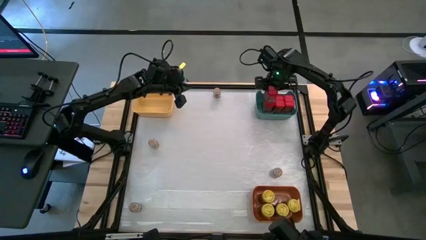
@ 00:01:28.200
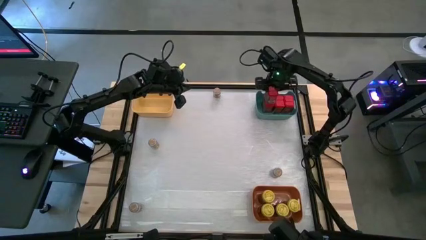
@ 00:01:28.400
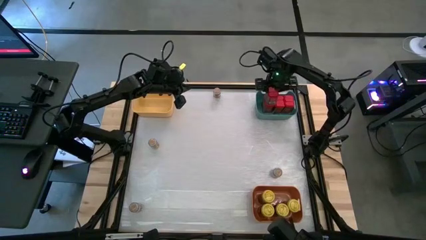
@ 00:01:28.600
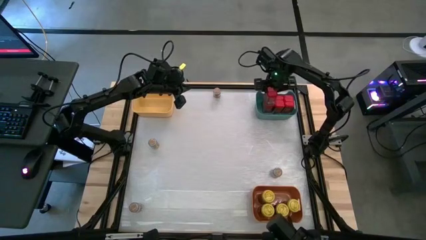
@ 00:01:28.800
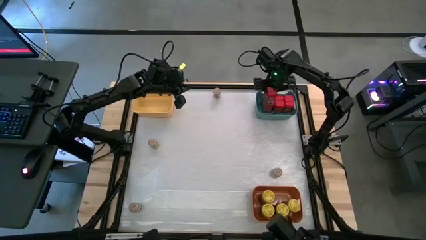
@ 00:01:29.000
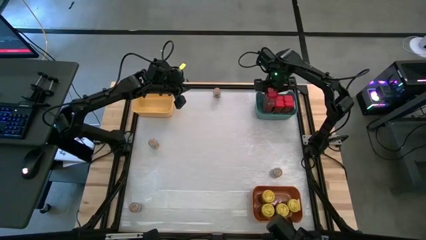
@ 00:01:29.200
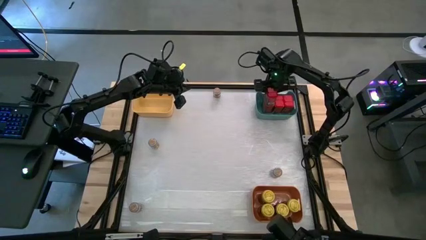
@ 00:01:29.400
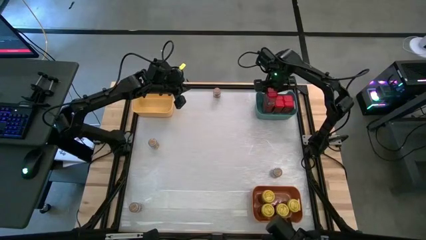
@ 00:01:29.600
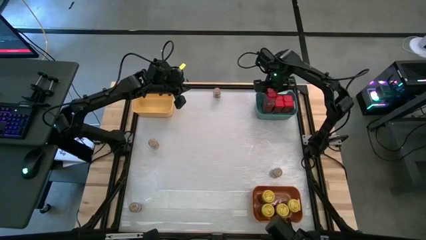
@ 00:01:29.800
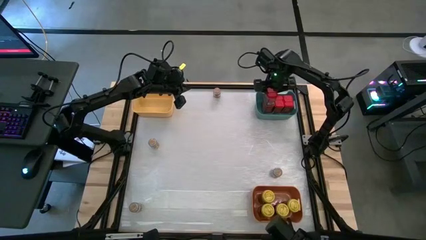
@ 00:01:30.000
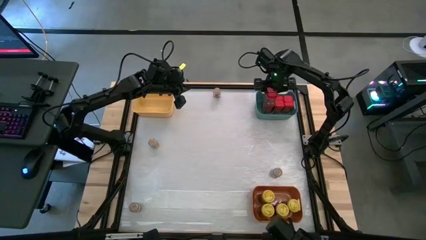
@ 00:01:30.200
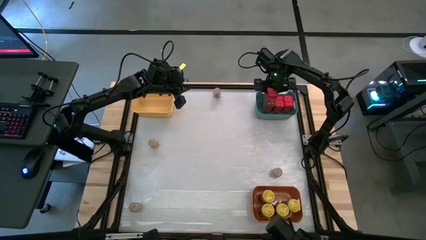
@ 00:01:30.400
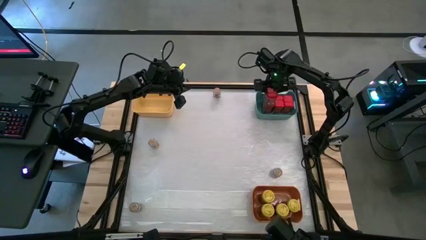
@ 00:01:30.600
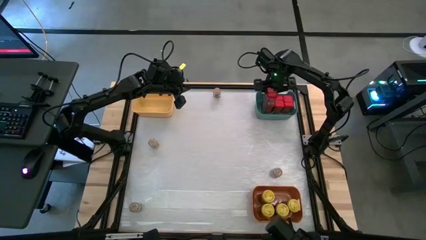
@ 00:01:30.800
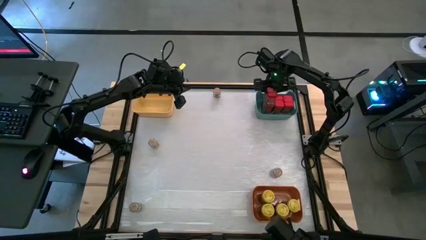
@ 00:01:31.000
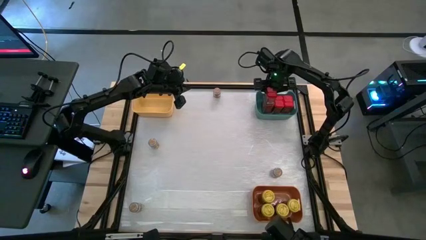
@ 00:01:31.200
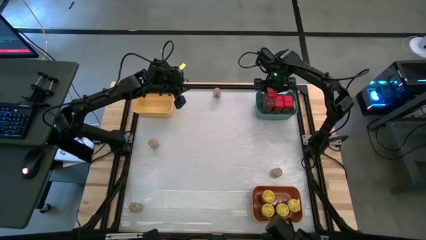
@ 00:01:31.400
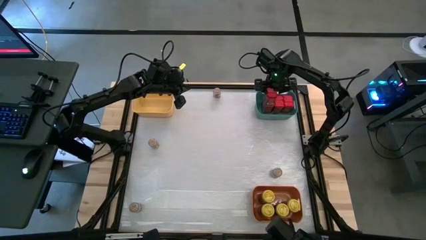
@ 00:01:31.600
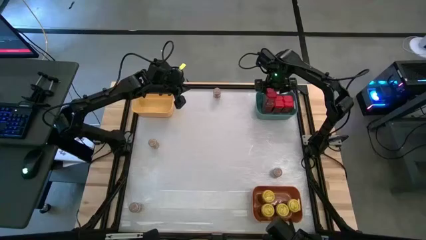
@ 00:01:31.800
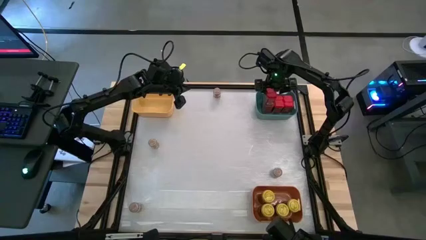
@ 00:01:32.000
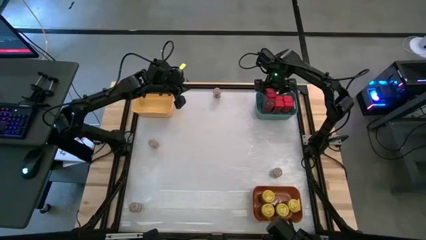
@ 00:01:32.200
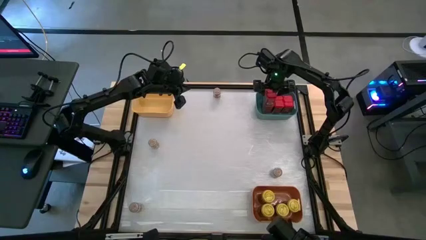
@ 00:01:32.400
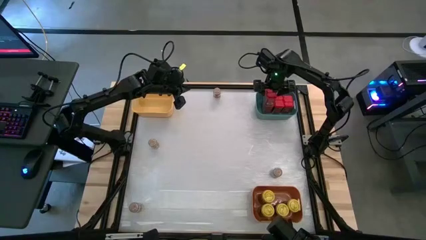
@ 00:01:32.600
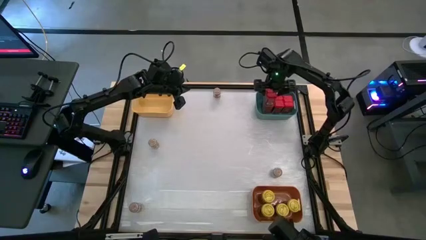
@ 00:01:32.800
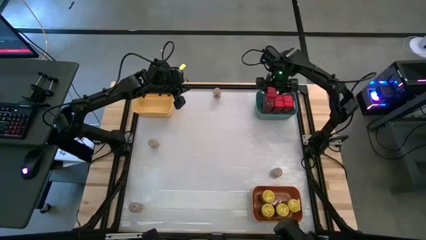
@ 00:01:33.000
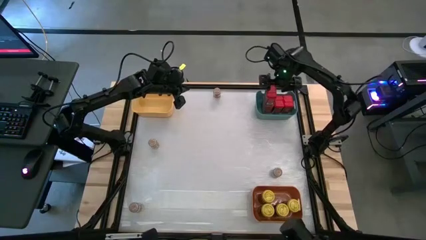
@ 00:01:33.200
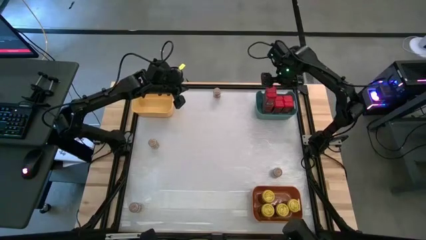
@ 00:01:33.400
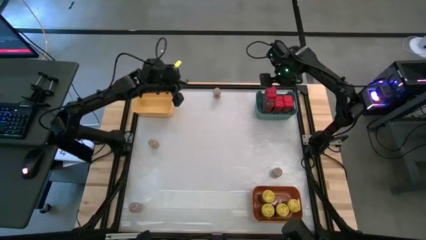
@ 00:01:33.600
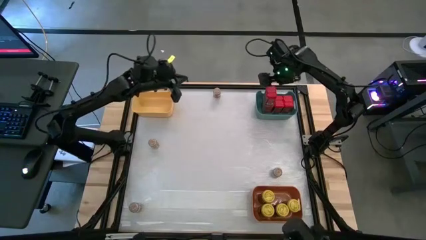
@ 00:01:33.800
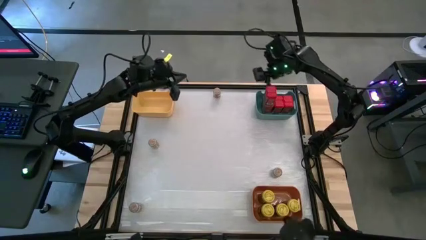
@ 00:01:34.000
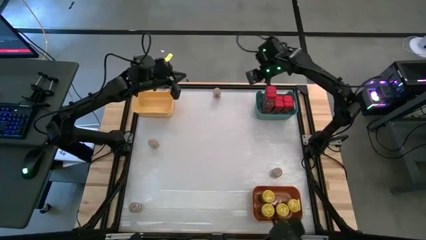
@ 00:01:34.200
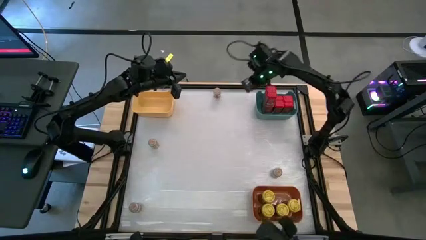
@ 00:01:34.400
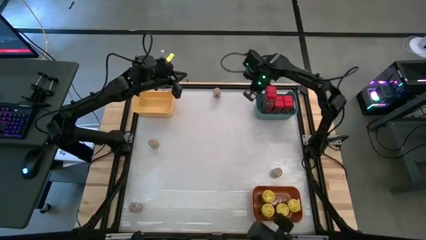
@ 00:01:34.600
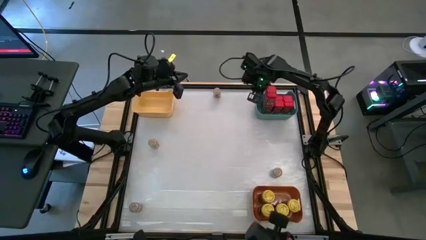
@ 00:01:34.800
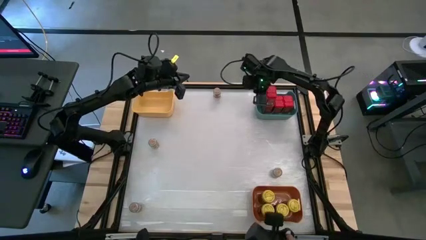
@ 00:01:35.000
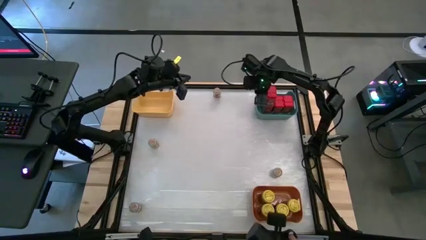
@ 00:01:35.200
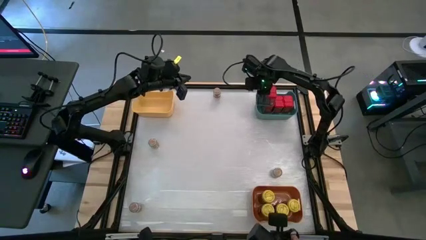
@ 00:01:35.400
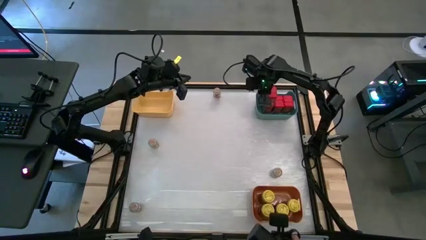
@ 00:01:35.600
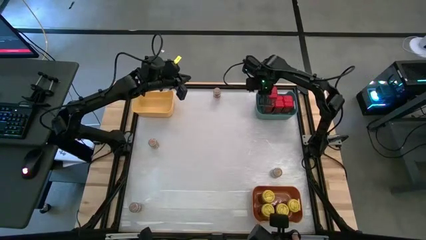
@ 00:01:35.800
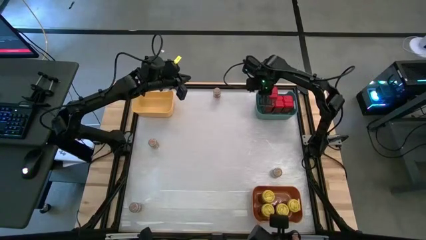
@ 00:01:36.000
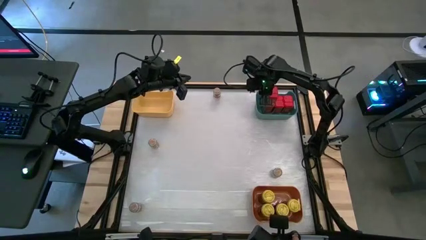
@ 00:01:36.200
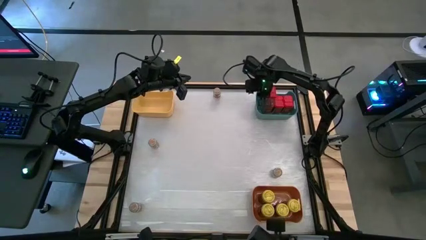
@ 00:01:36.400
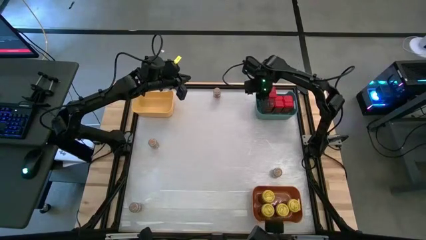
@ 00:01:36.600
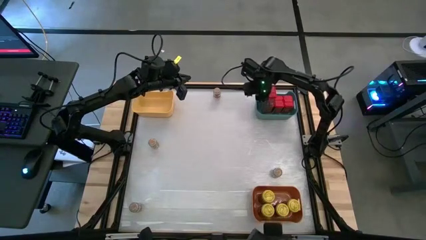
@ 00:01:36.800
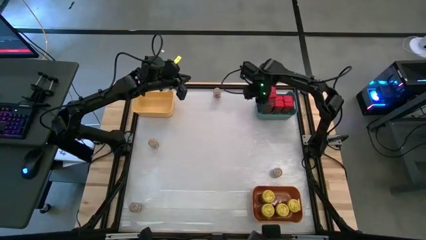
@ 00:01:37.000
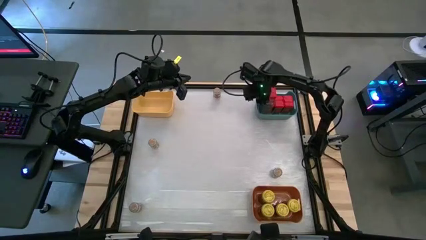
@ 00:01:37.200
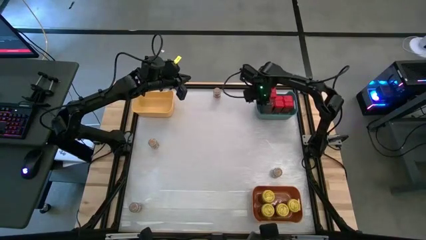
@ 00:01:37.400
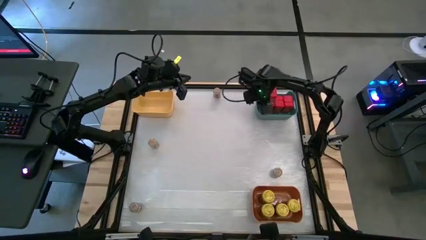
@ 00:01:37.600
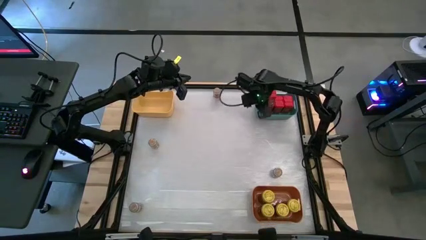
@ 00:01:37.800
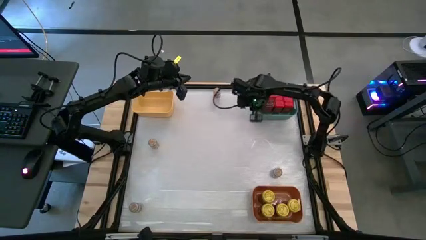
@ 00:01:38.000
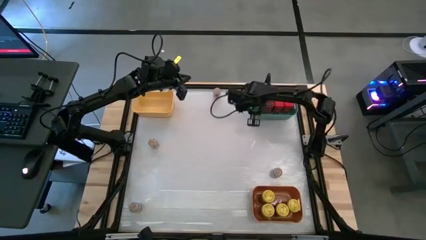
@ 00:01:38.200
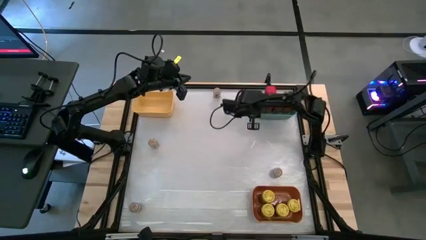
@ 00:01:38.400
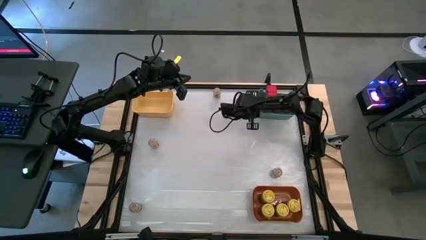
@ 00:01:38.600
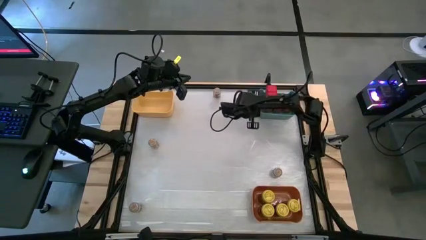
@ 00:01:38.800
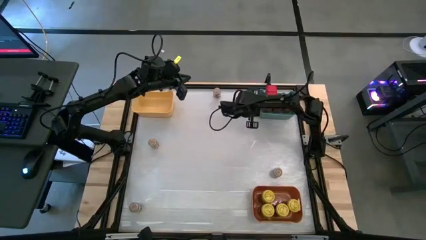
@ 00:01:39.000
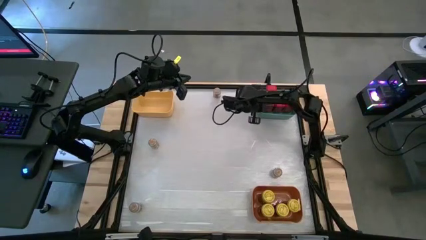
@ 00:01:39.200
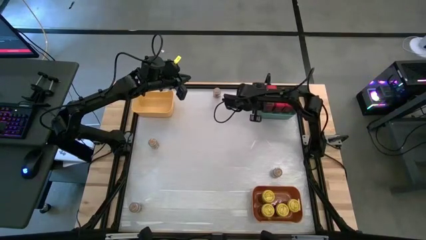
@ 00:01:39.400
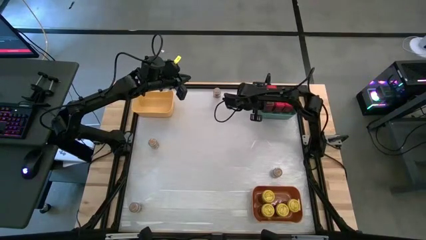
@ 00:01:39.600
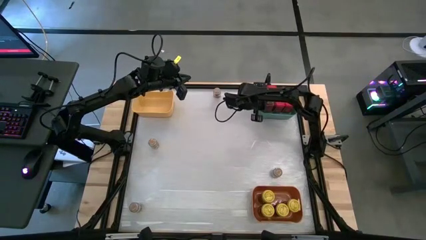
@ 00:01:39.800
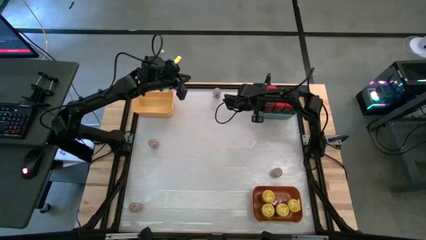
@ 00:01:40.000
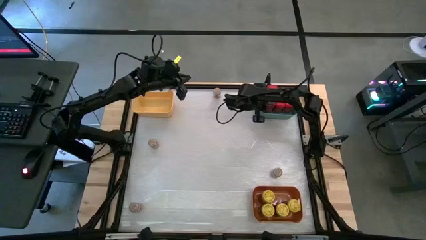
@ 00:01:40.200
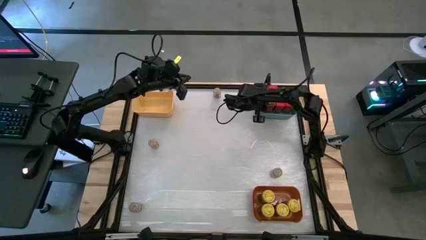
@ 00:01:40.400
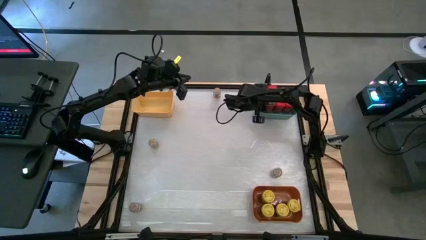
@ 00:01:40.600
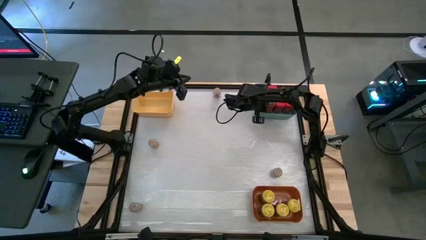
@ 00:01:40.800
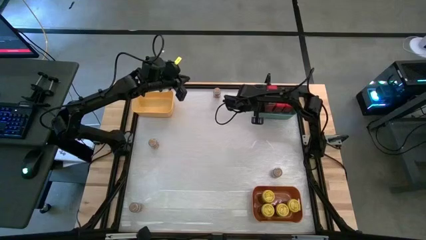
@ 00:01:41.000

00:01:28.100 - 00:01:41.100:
Task: Sort spices by type
Stack the red seasoning can on top of the other red seasoning can on the green bin

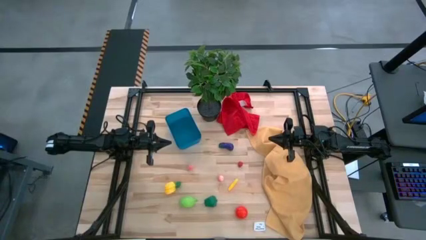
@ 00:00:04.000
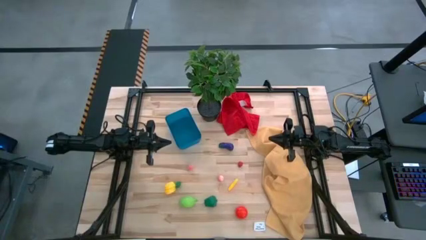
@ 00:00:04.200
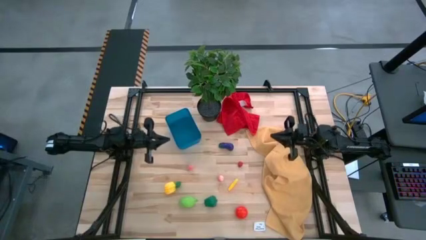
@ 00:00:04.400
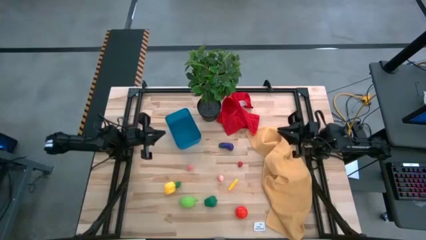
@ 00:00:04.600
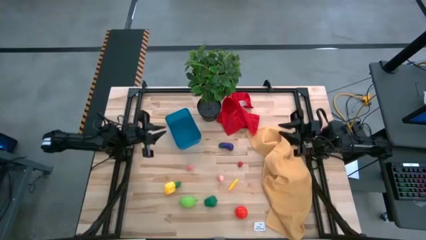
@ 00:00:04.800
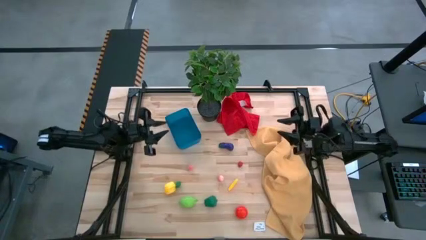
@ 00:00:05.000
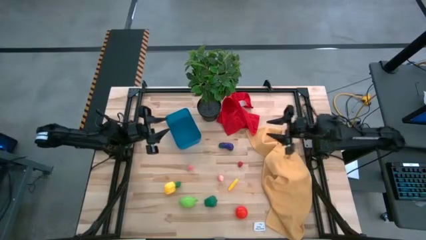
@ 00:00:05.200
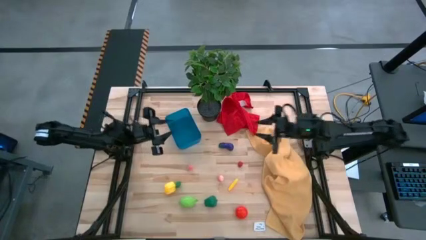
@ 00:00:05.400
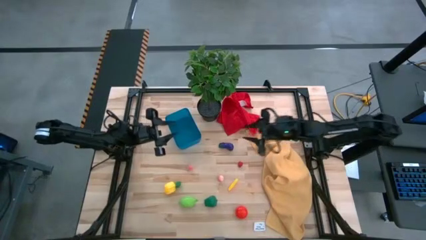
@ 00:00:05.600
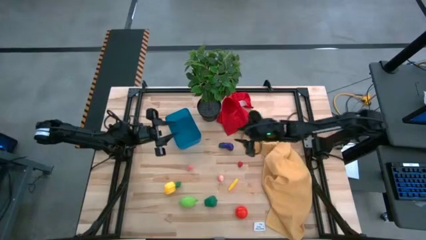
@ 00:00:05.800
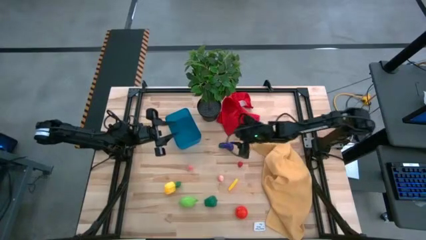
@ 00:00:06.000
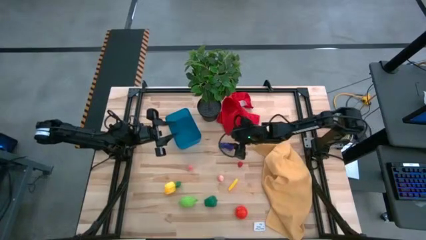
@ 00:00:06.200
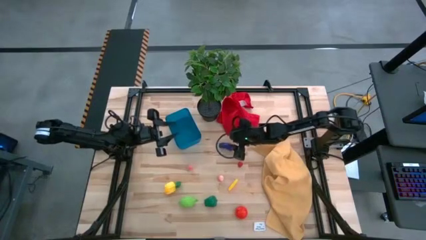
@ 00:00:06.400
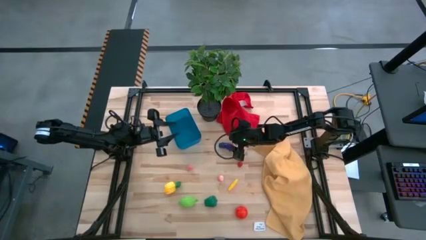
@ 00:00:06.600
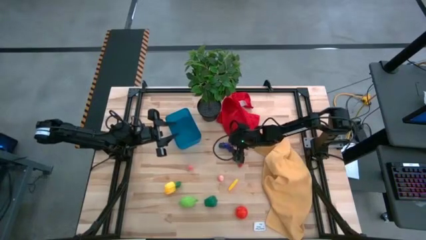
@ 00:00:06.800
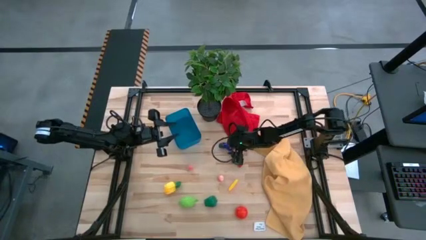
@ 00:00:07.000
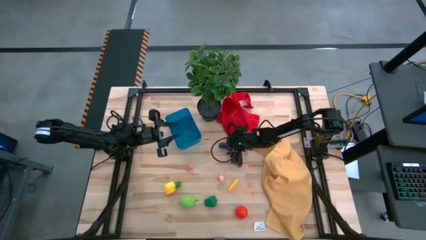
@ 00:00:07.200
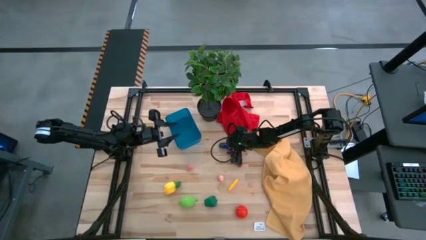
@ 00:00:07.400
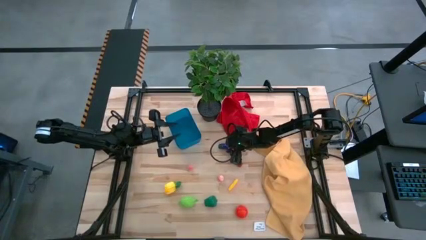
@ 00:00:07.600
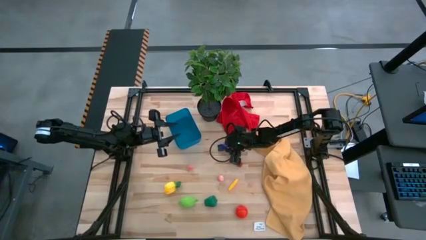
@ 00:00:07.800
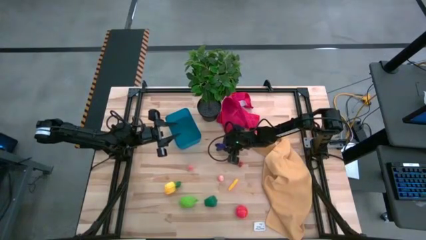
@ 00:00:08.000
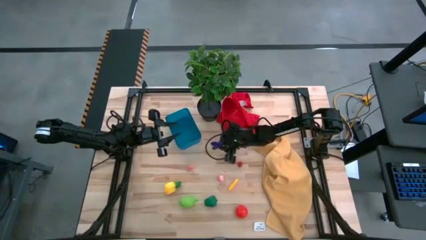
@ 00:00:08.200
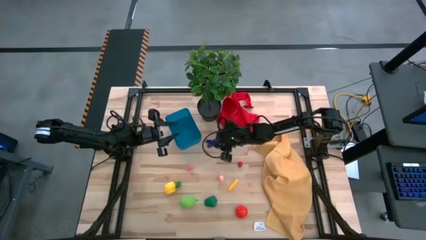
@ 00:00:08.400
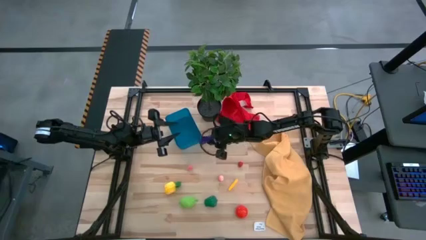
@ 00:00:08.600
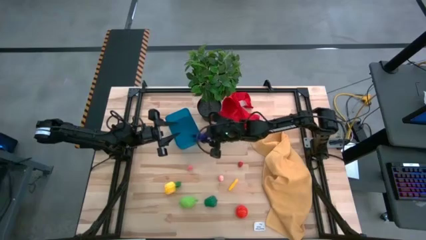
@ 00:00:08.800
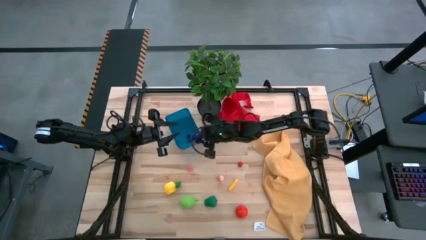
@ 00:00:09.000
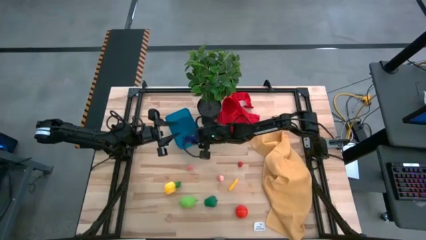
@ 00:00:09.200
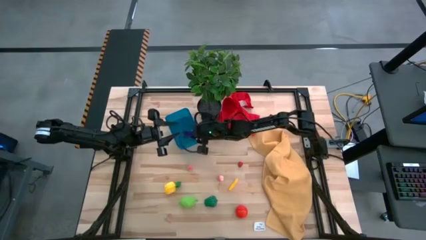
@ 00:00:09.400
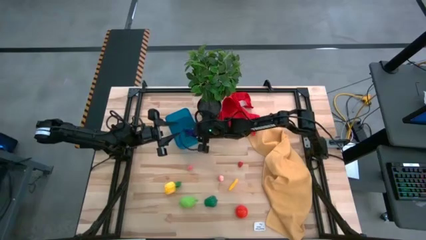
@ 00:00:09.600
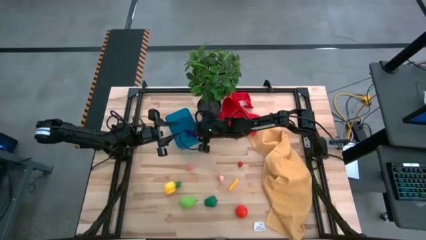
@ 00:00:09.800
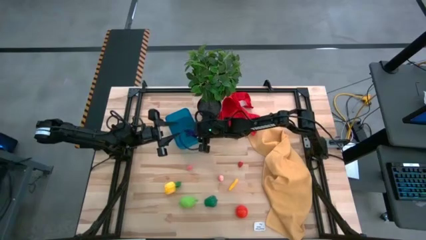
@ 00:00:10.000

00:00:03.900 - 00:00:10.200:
Task: Pick and placing Produce into tupperware
Put the purple eggplant into the blue bin
